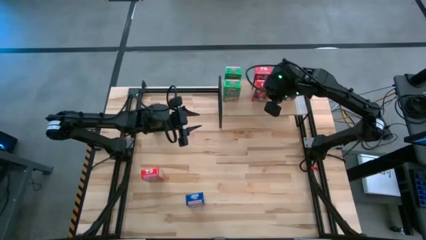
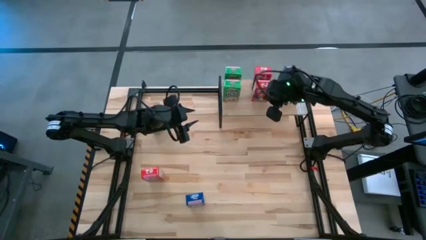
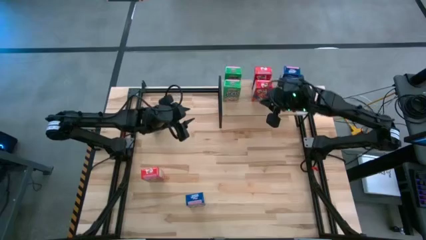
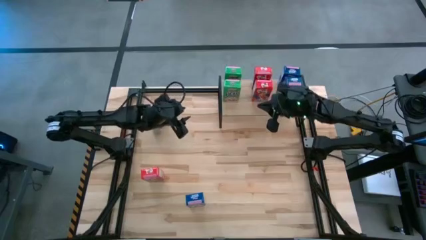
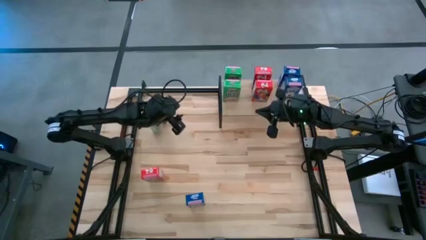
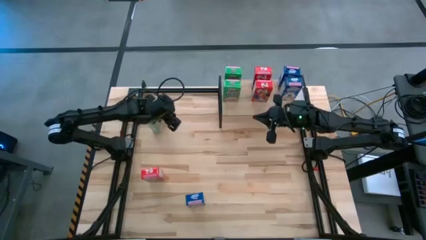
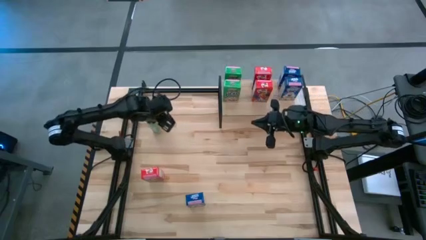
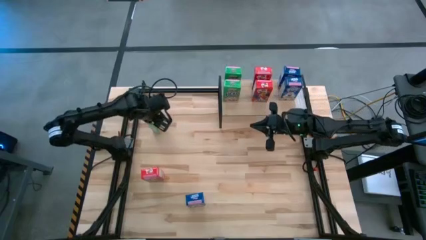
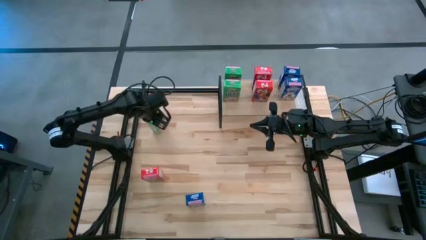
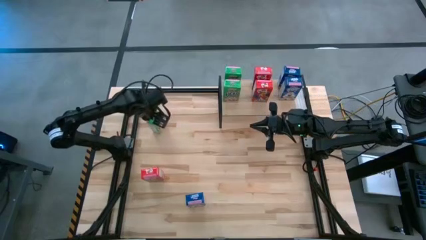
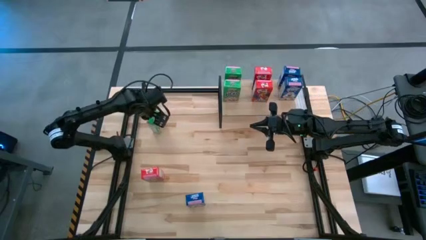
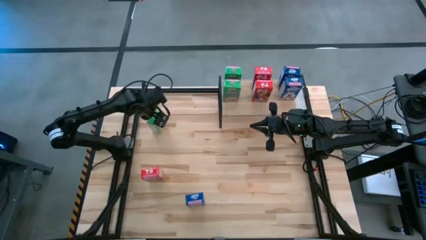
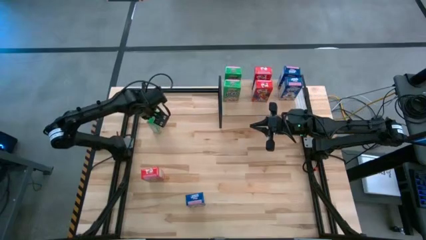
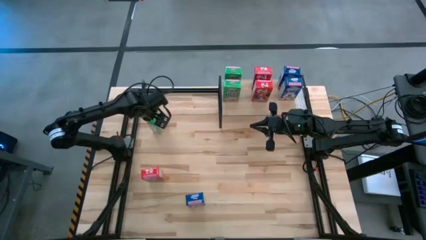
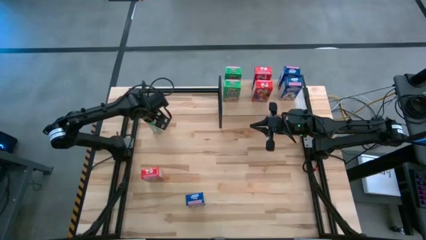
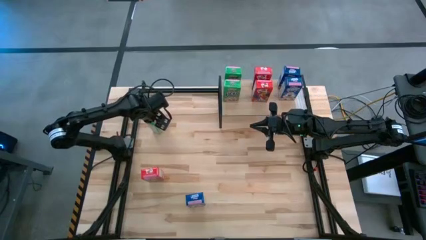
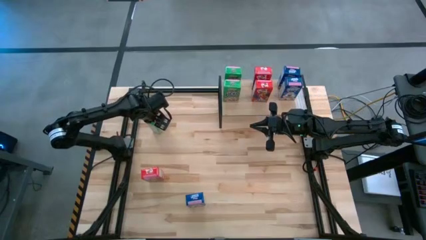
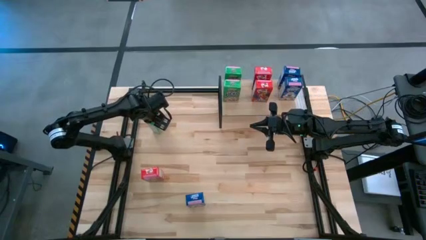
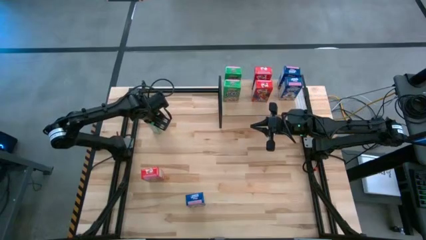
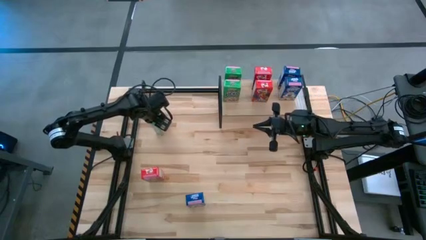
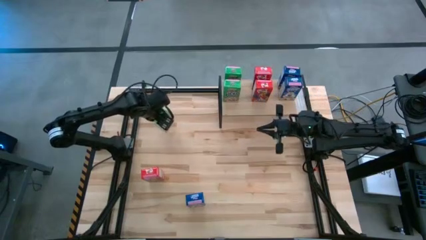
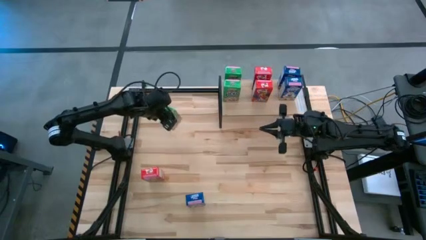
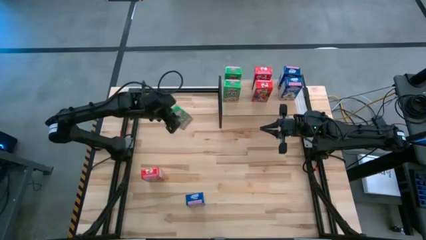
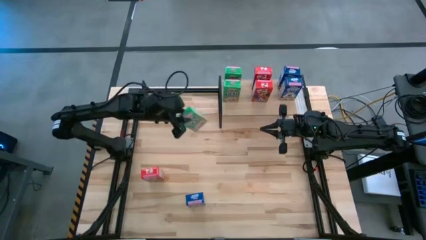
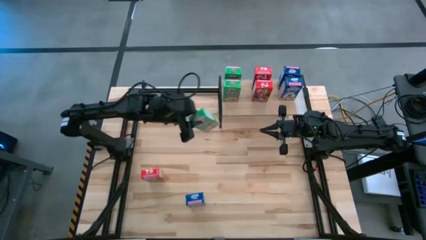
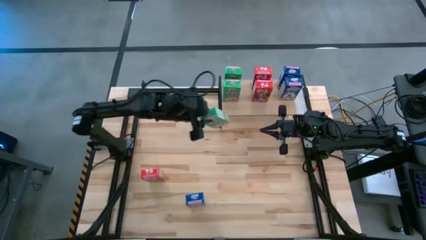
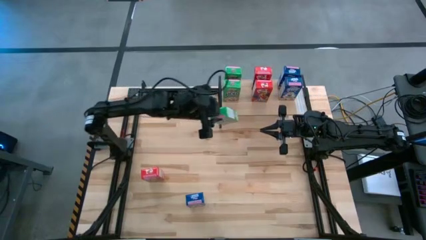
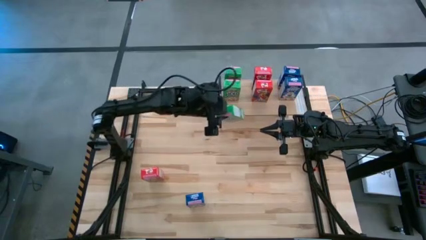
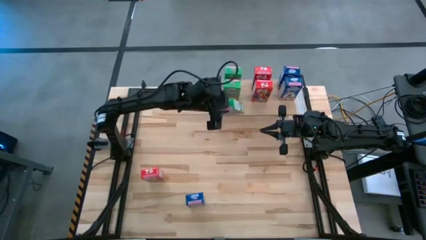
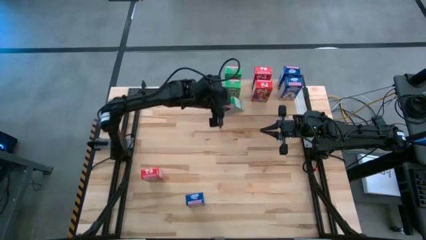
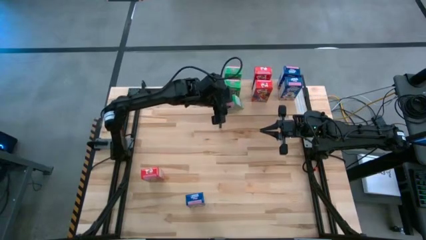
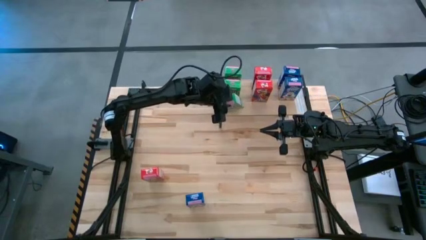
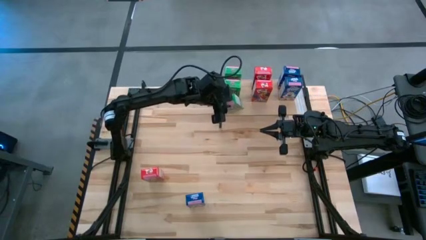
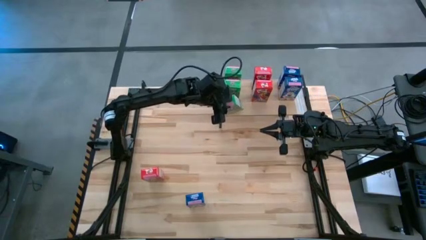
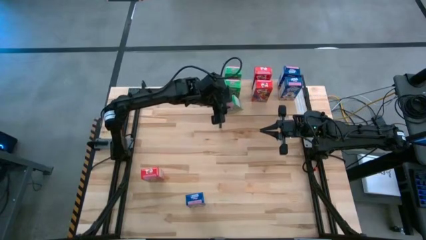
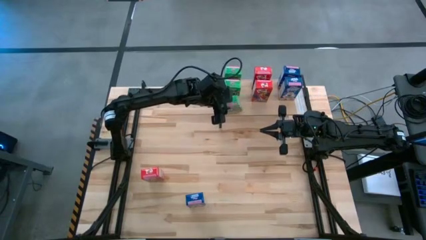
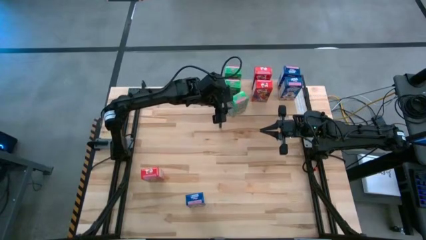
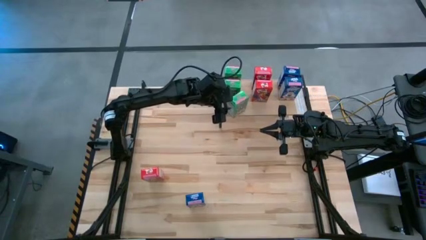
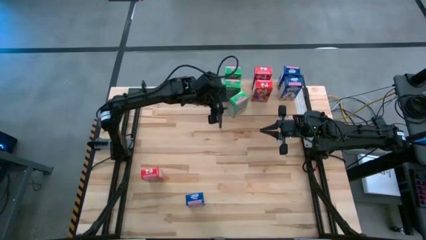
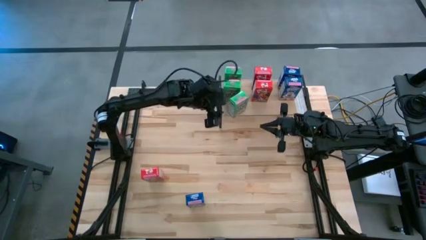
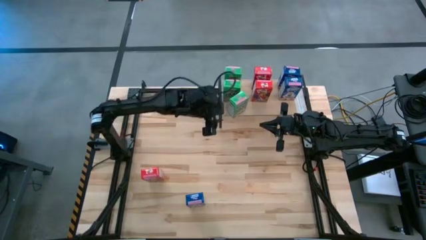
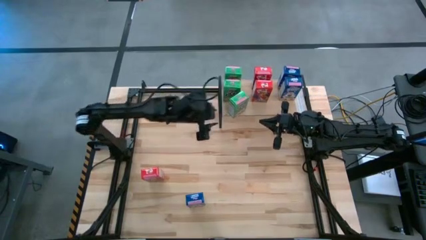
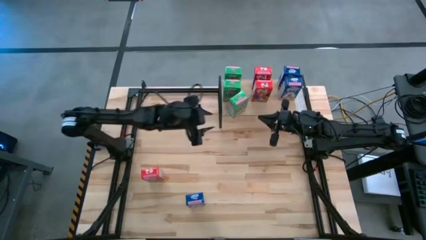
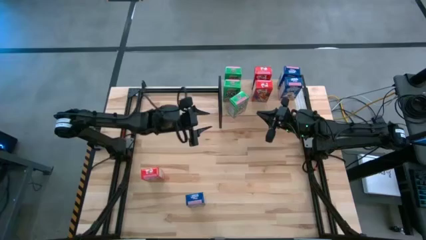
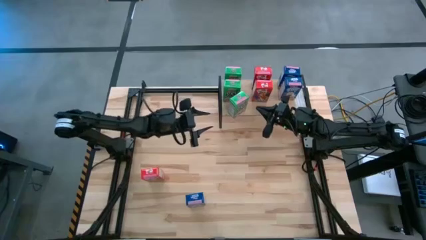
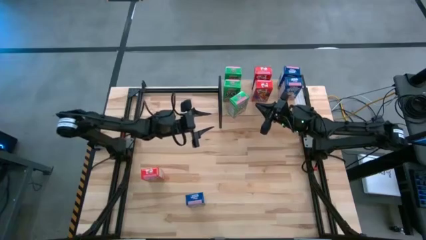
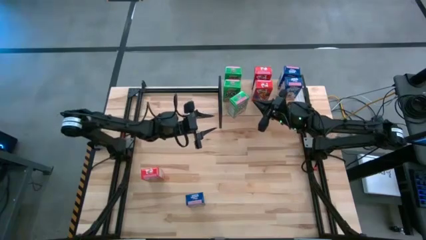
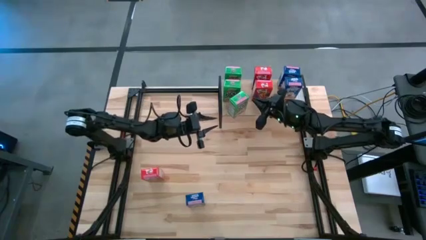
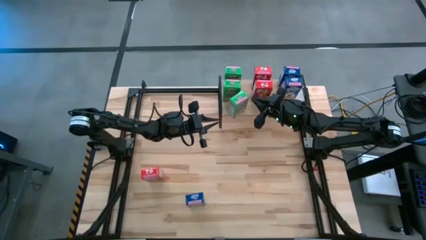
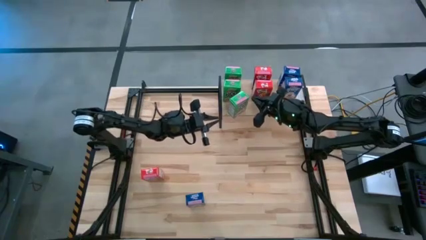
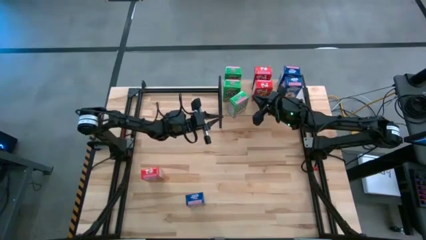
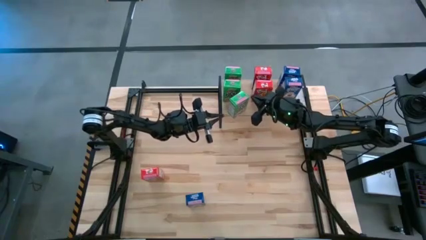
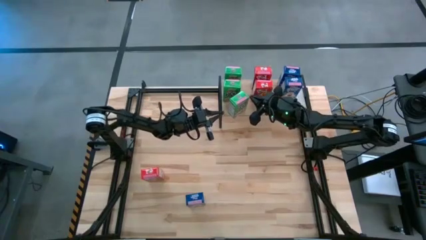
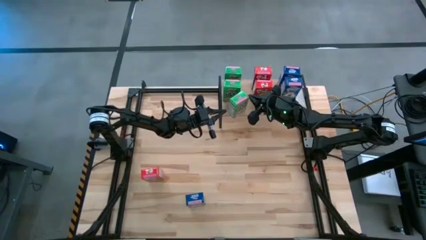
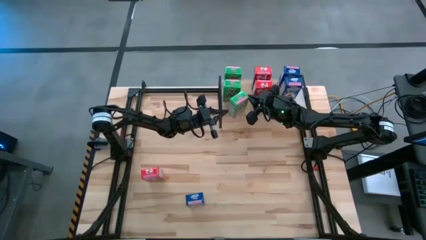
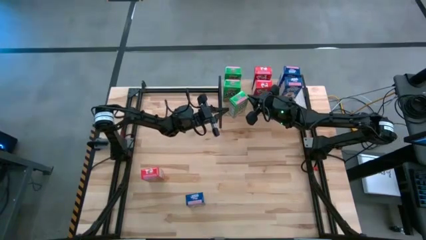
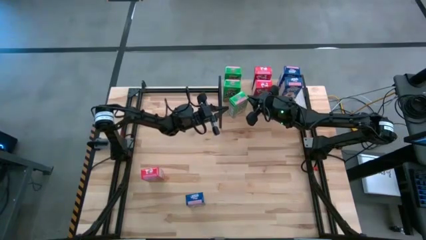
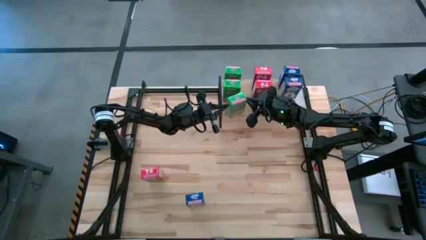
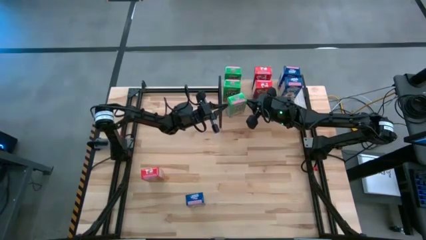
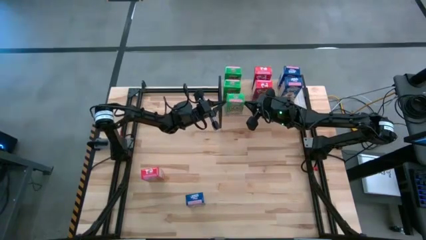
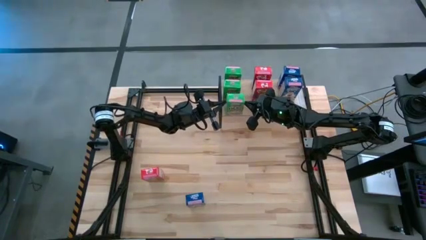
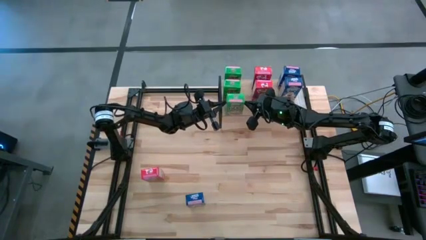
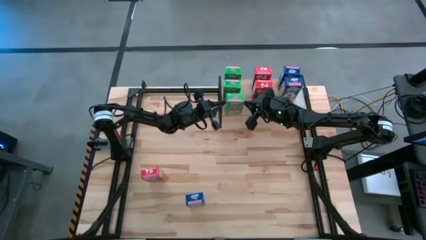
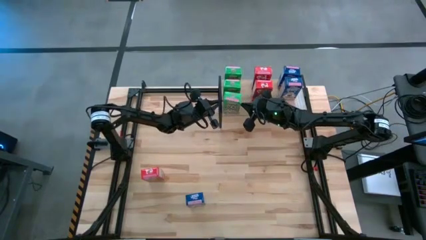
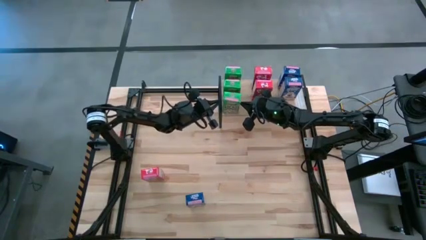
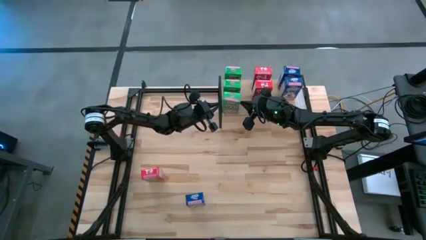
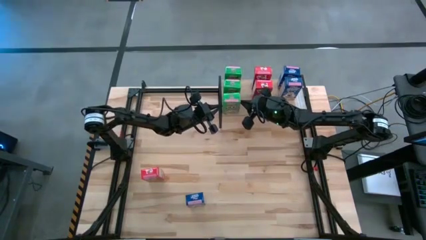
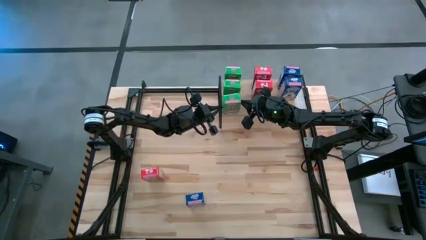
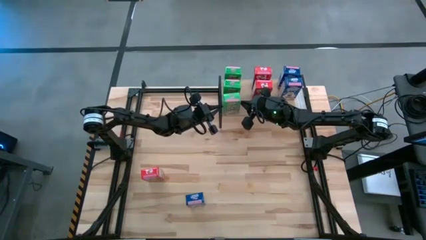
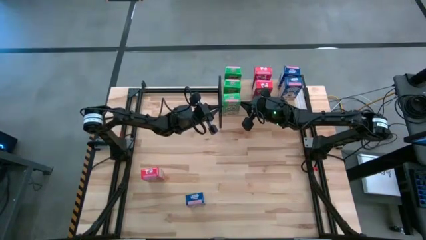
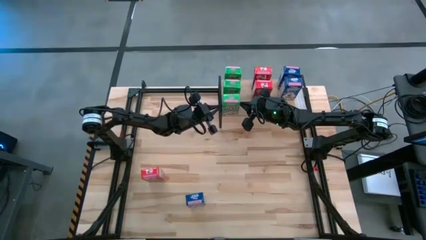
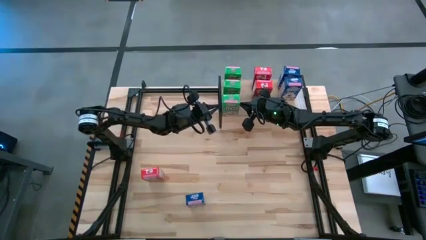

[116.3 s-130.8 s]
Task: Stack cereal on shelf
Put the top green cereal box on the shelf aligned with other green cereal boxes

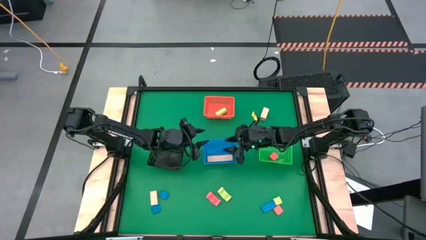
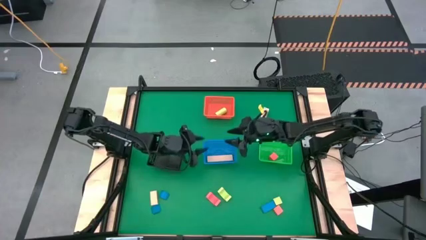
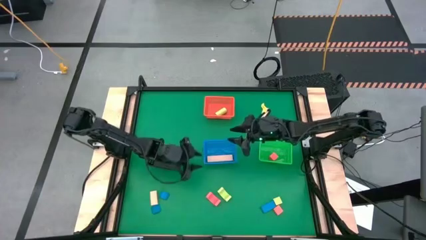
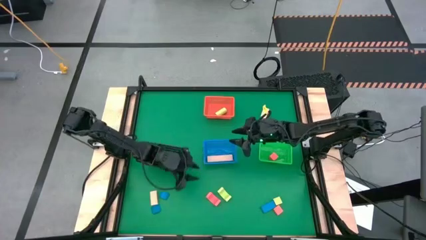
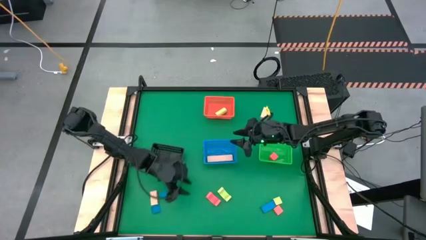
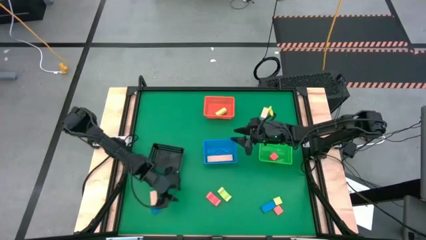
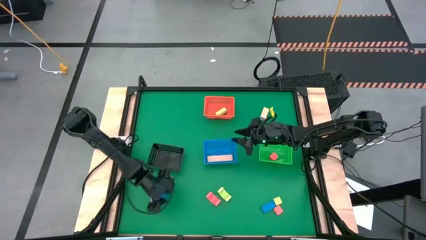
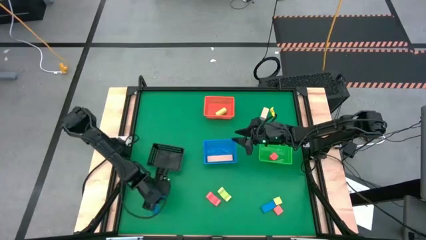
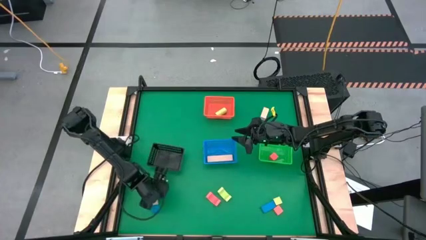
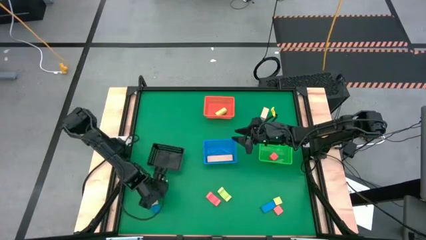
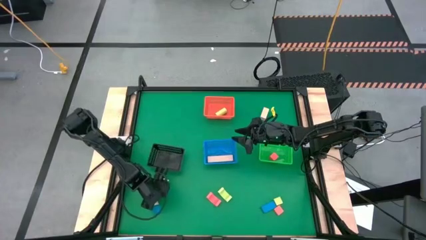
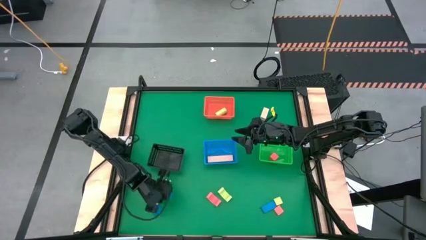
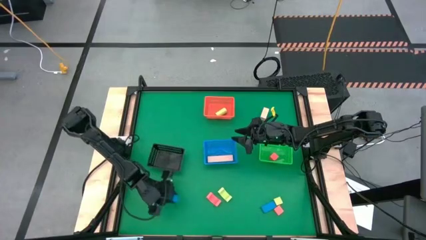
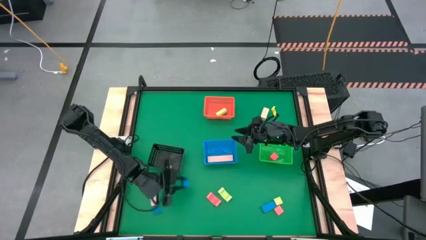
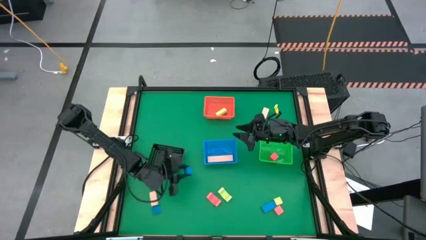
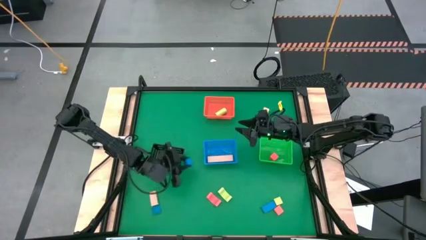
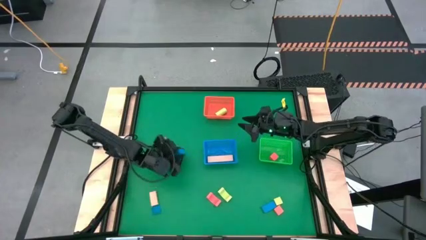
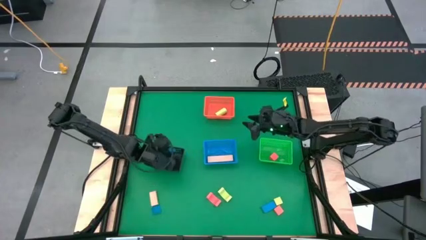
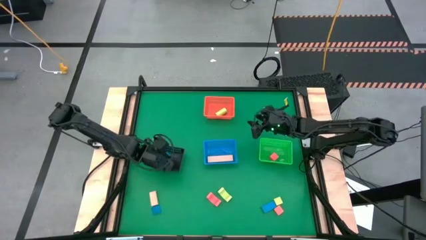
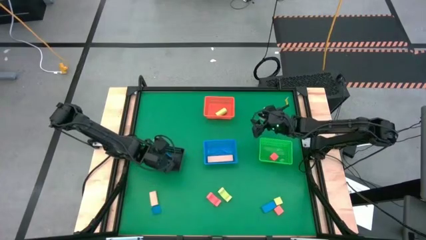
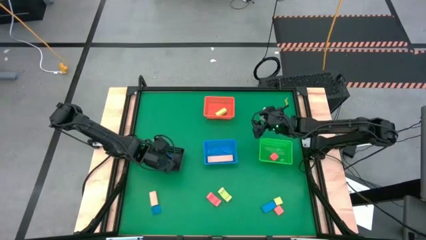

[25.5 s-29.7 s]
Task: Sort & place blocks by color
Put the top left blue half-cylinder block into the black bin
